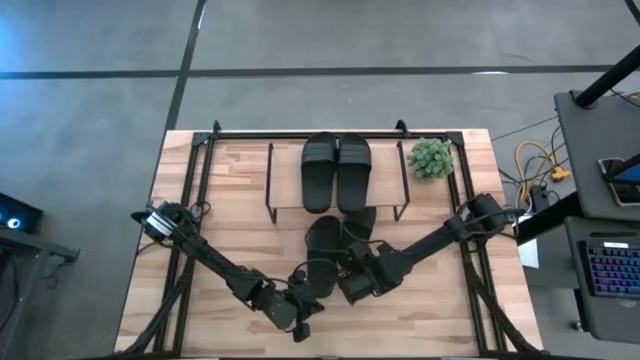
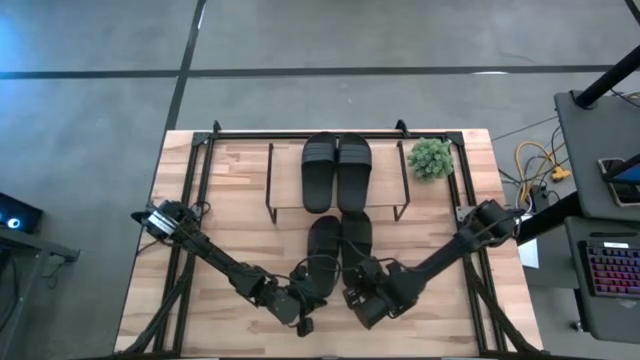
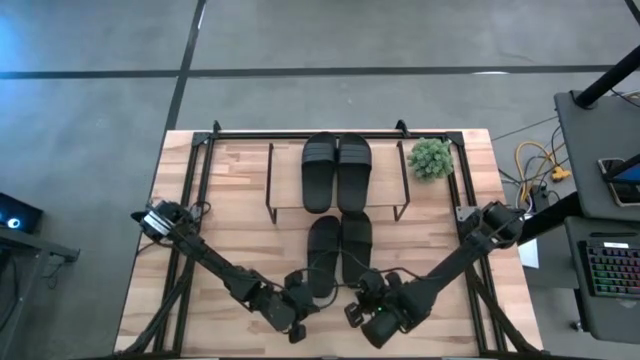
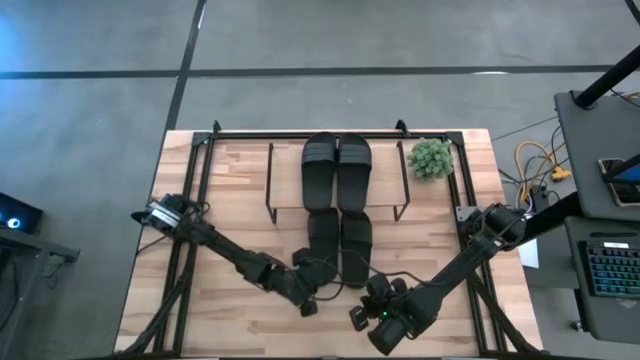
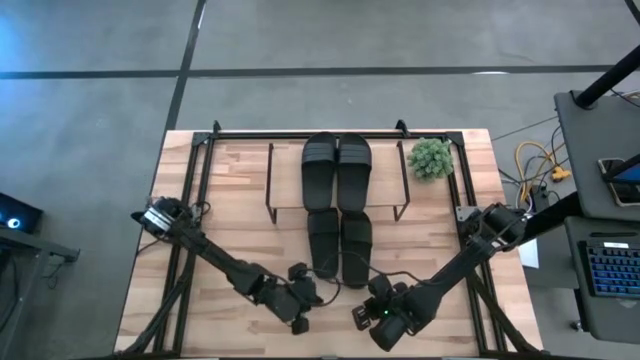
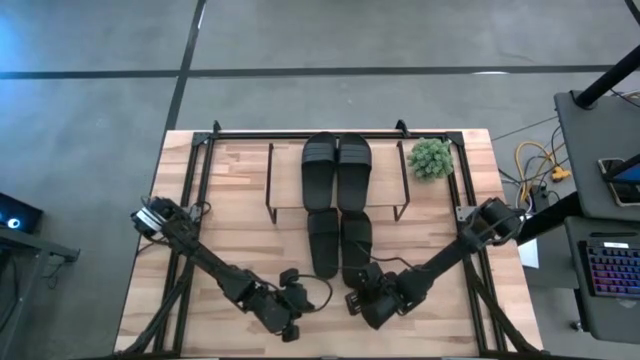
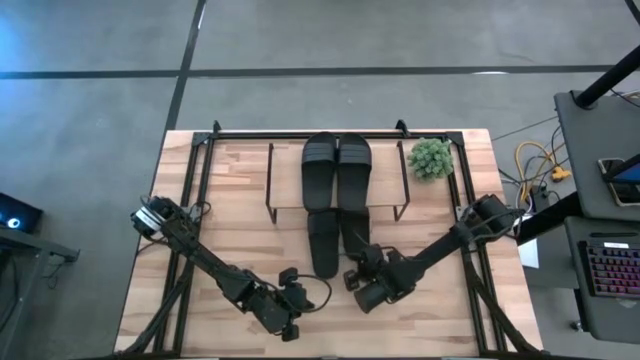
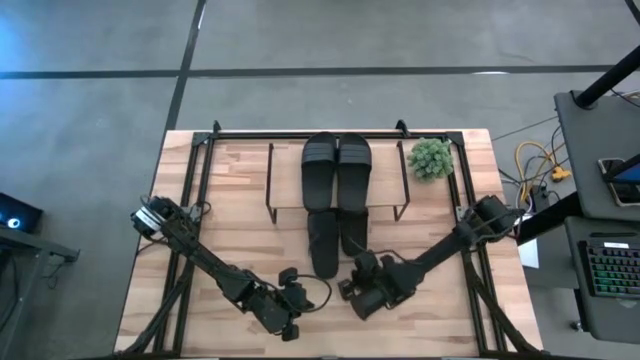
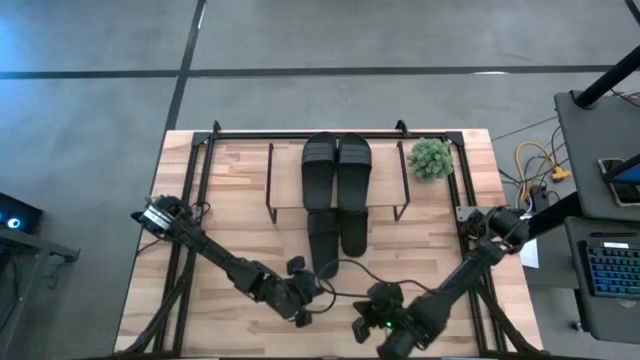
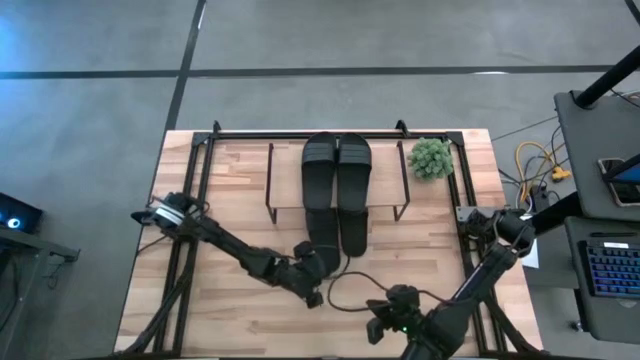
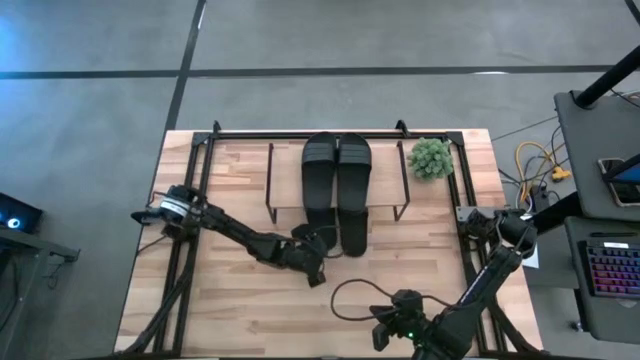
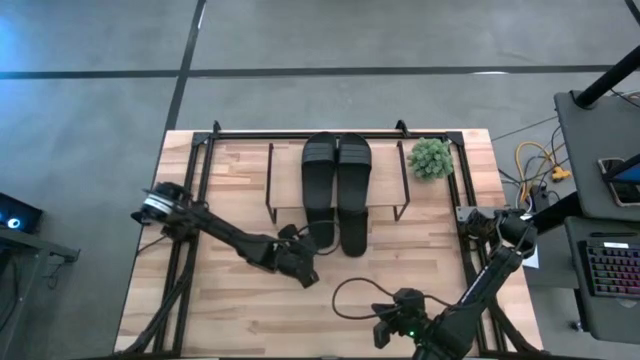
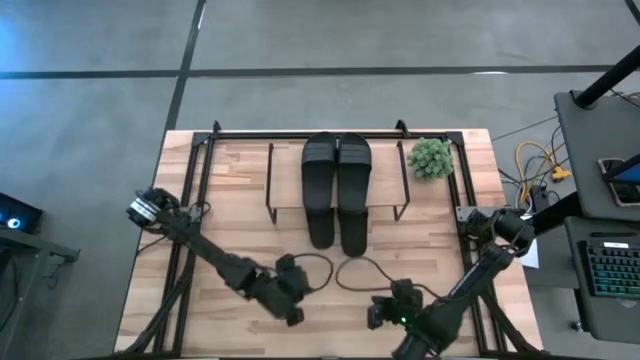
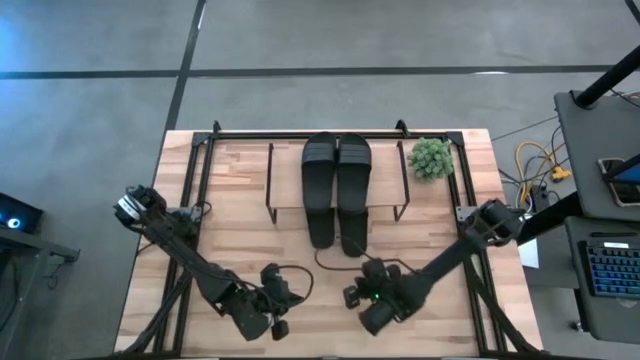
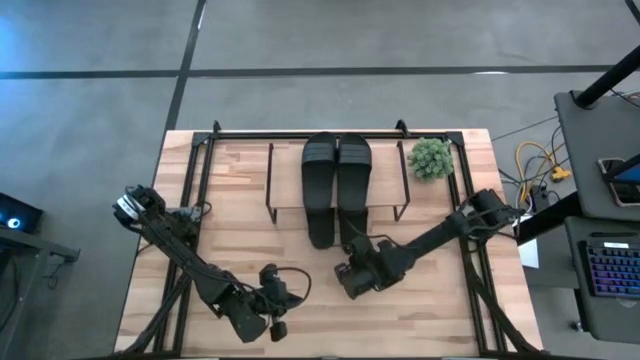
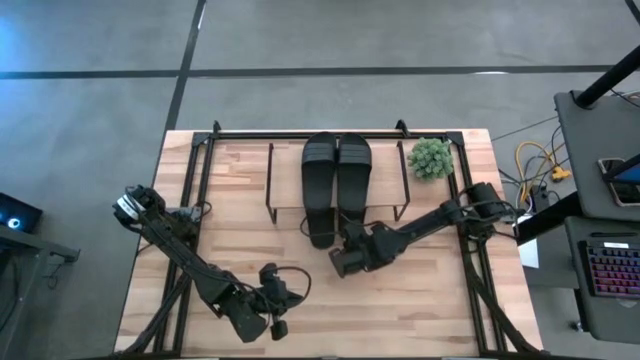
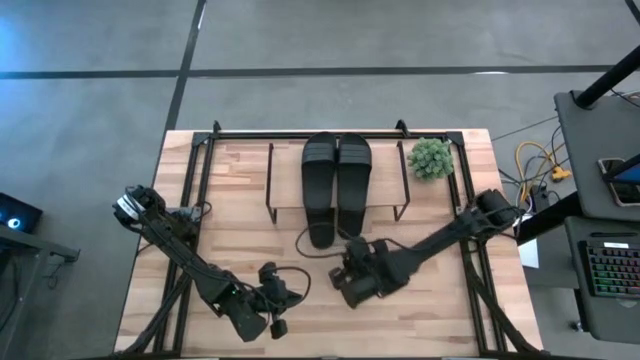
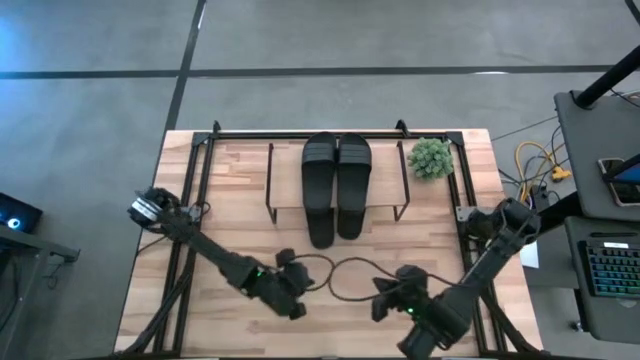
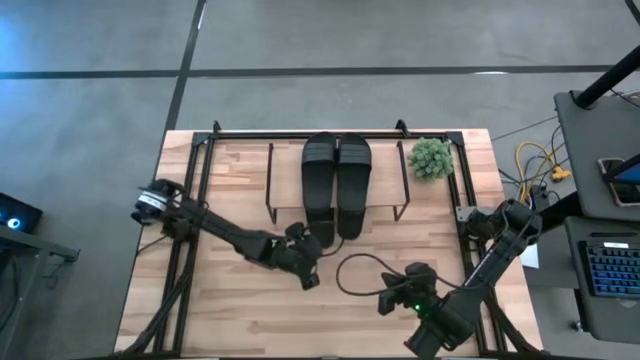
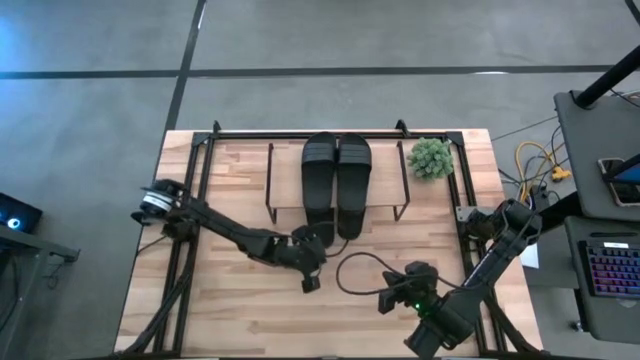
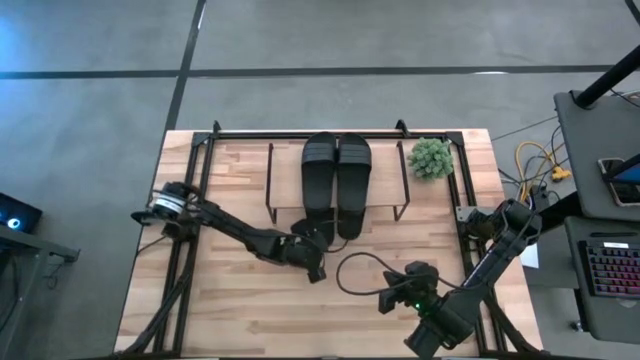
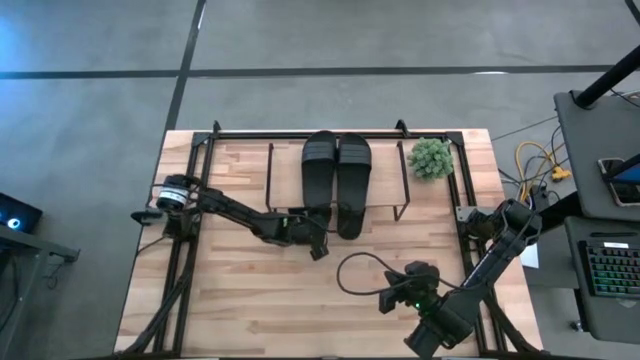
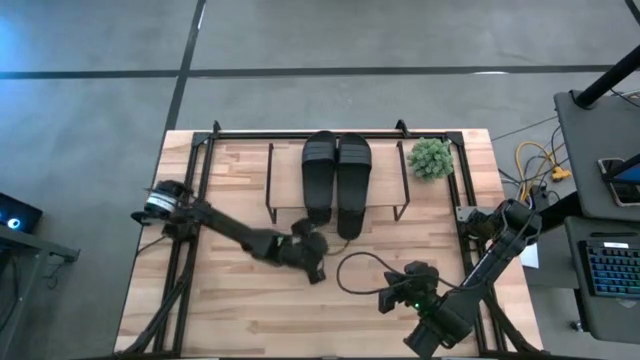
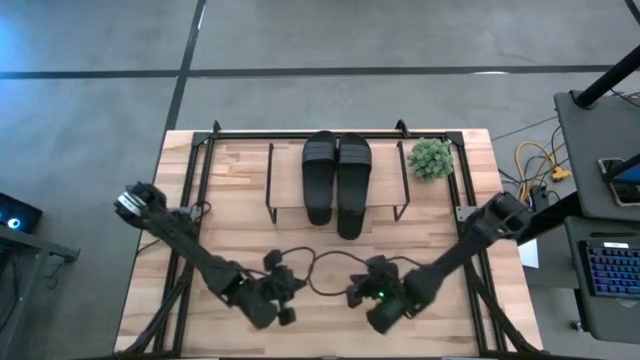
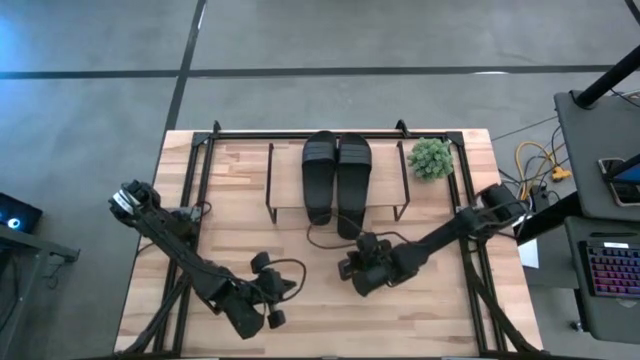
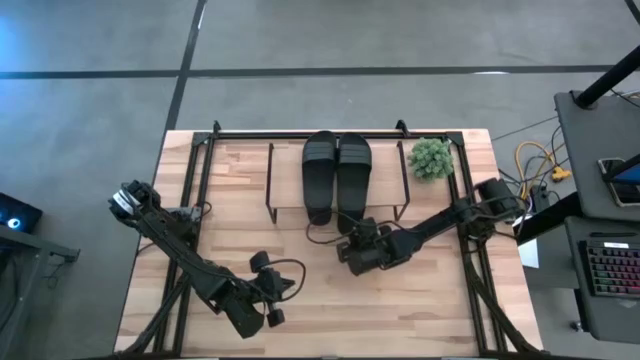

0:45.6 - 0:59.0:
Task: Pick and place slides into the shelf
Move the black slides under the shelf
